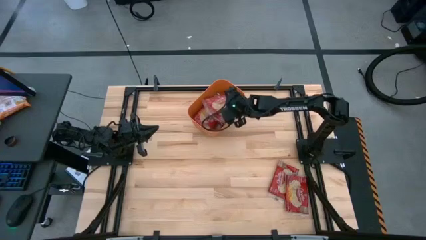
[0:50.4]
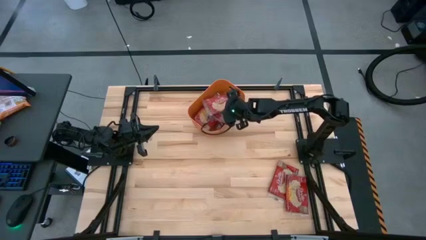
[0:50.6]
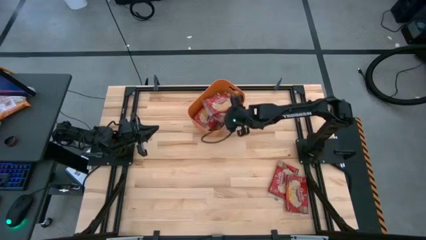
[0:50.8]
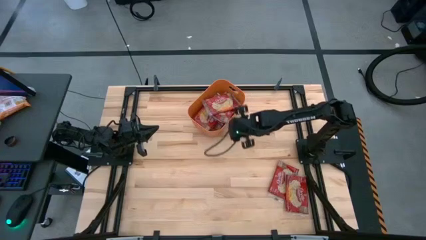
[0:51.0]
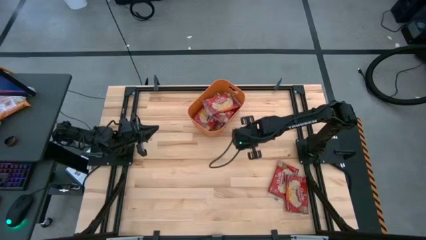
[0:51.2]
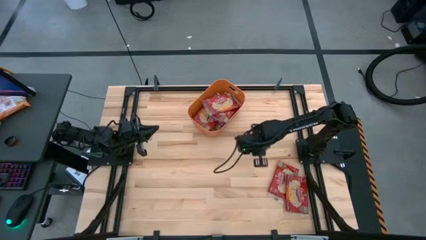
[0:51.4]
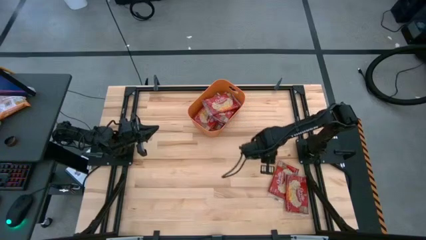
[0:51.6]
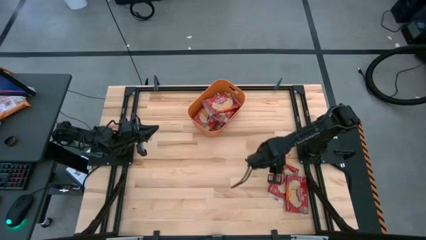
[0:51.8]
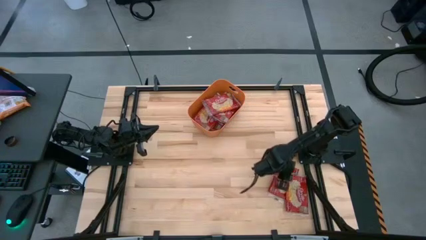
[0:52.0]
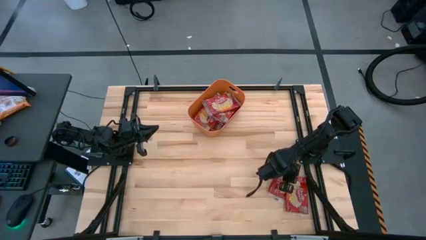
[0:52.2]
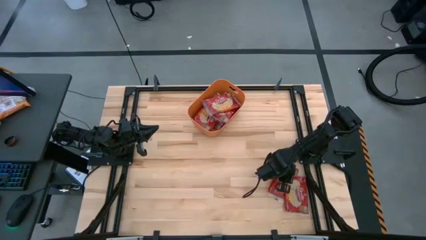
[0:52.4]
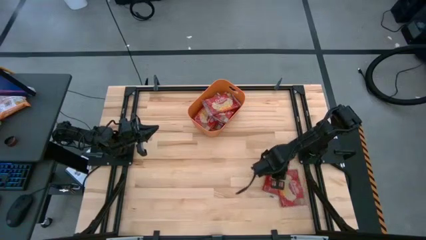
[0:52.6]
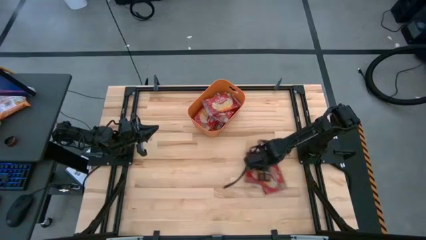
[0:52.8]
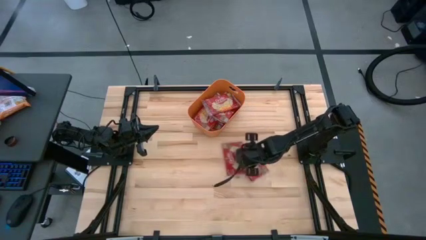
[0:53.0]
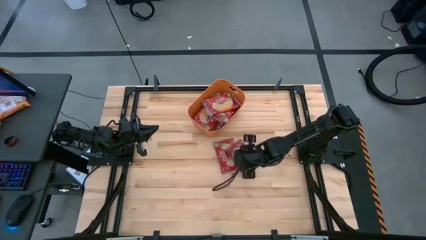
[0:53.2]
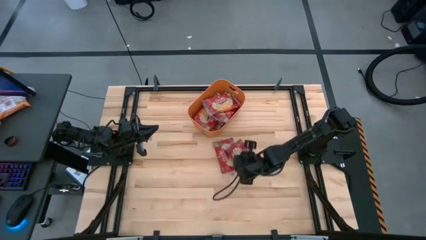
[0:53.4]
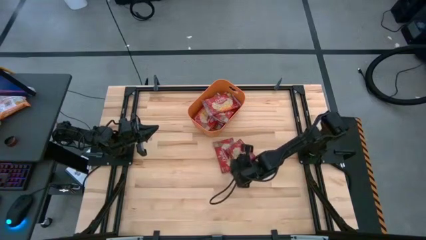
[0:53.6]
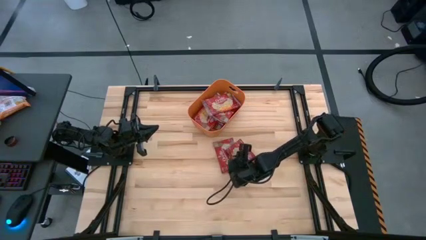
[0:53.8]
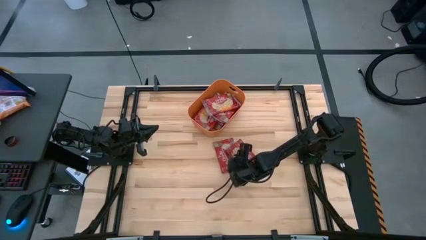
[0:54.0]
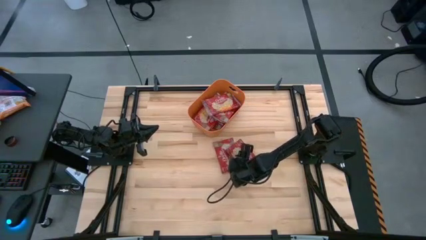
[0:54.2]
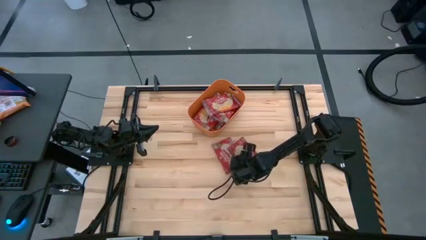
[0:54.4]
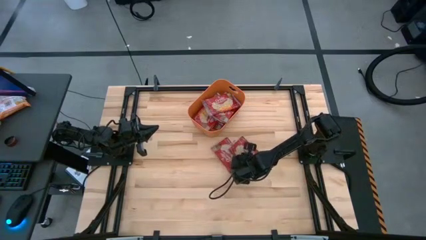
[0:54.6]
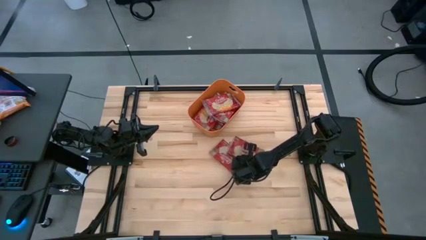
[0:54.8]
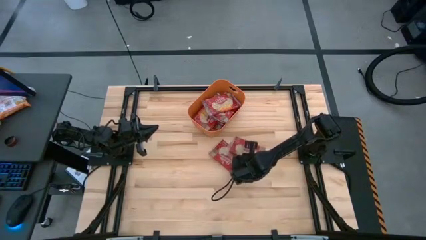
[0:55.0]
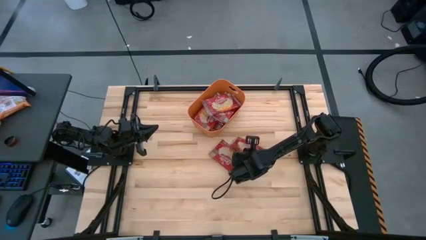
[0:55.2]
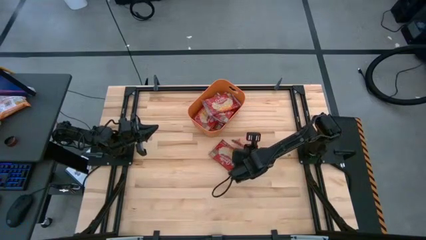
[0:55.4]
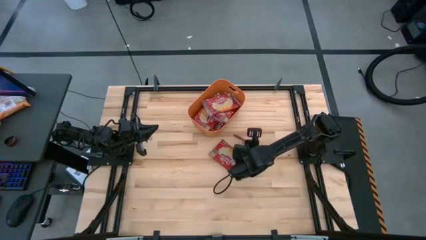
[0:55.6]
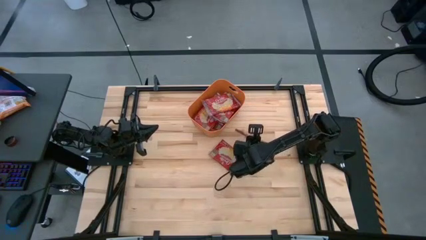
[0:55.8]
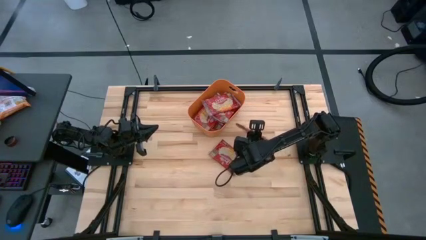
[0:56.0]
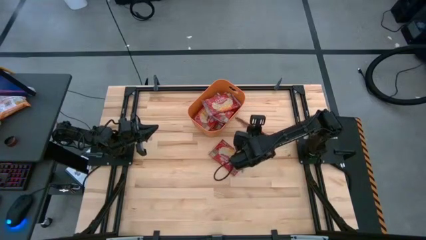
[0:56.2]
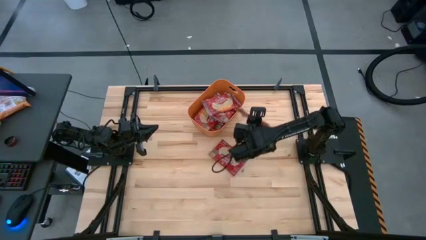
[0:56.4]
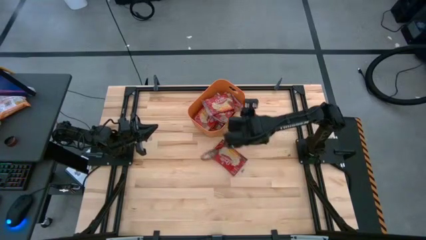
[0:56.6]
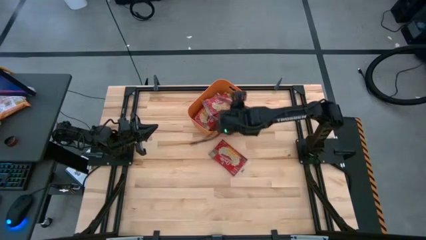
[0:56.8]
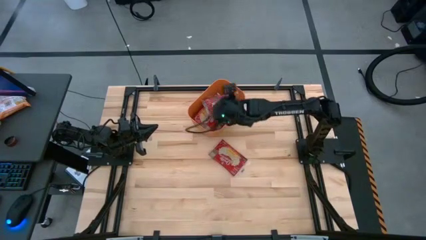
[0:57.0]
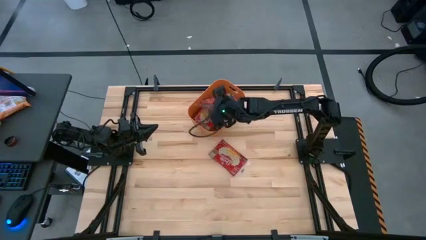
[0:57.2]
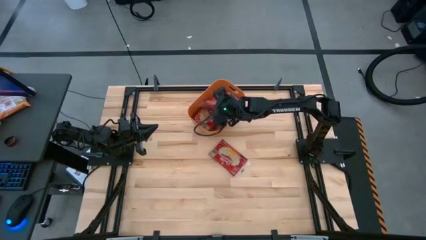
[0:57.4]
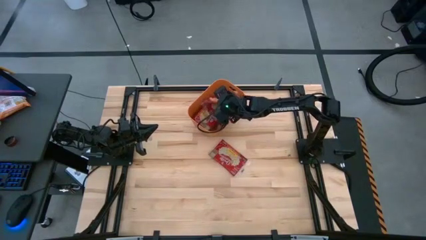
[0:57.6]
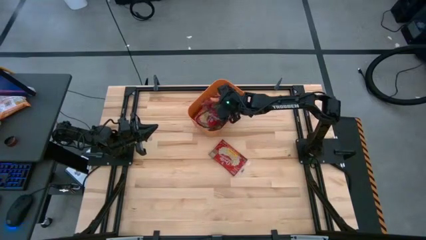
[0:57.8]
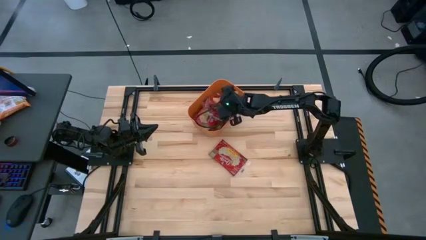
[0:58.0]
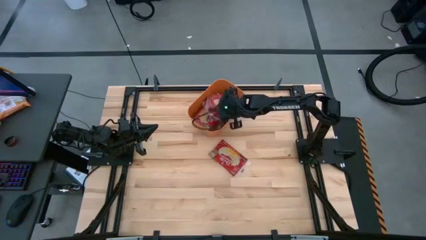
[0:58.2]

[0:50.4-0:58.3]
Task: Sort popcorn bags into baskets
Put the top red popcorn bag into the orange bin

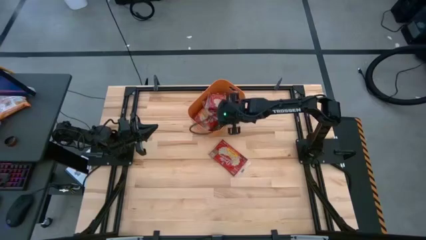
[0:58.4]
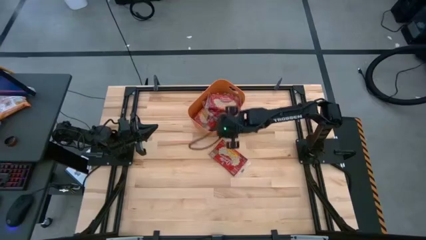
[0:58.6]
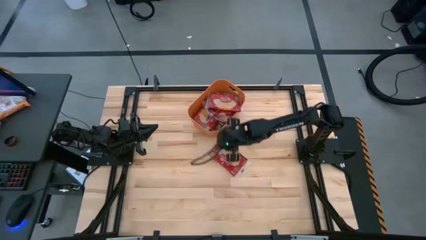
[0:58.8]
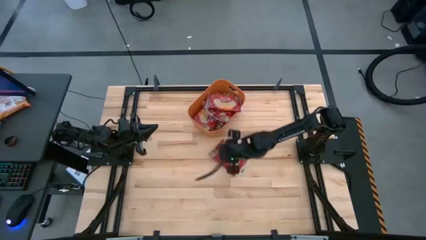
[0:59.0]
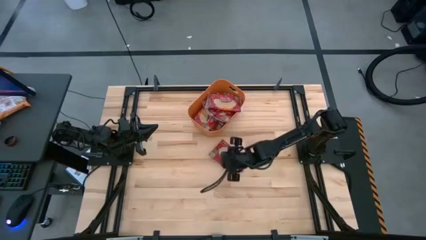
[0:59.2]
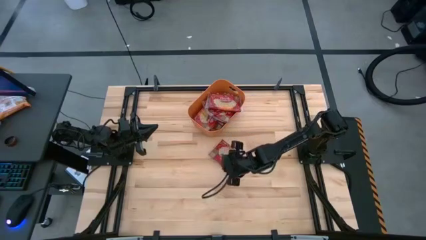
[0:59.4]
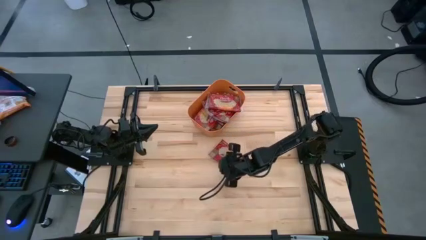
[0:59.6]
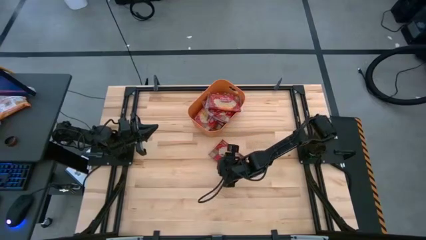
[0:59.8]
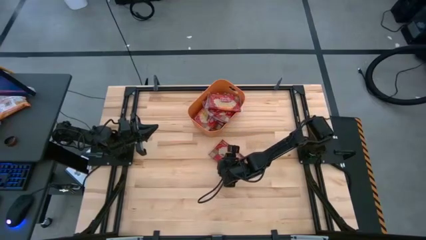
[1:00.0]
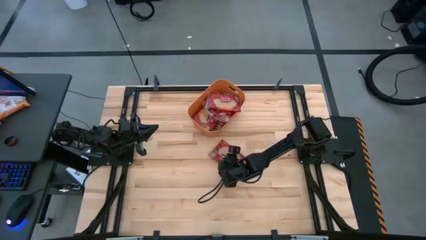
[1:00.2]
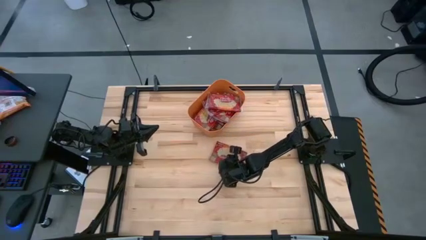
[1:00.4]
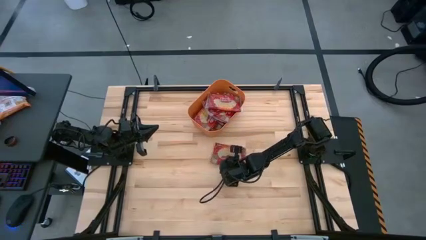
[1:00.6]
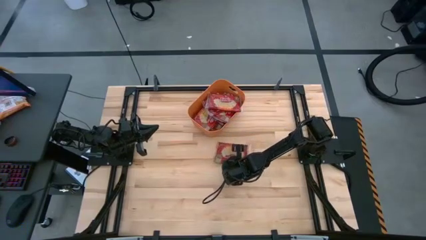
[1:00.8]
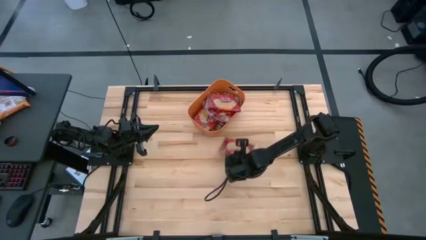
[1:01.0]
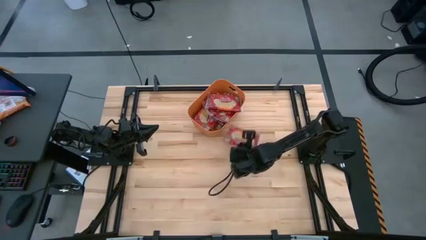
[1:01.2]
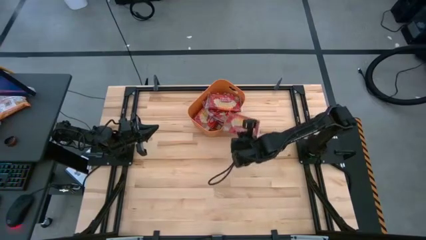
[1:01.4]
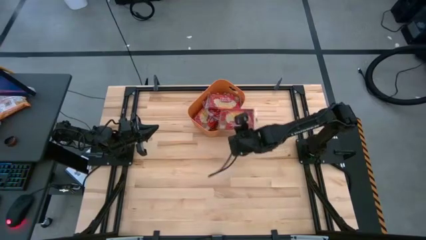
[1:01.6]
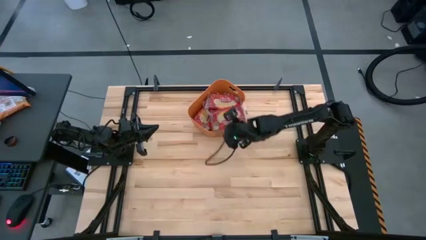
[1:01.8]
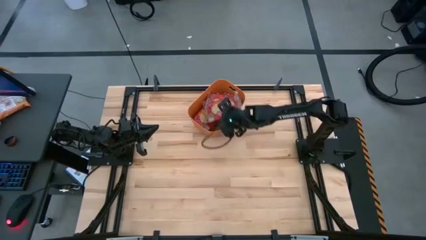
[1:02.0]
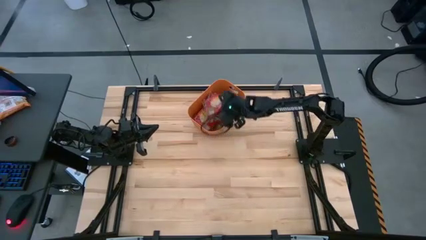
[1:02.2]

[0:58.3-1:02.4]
Put the red popcorn bag into the orange bin

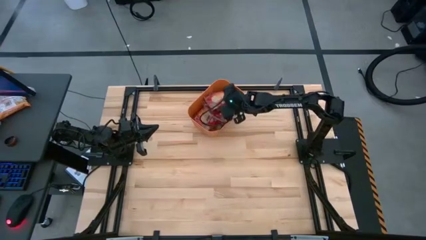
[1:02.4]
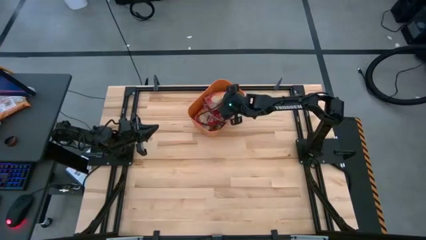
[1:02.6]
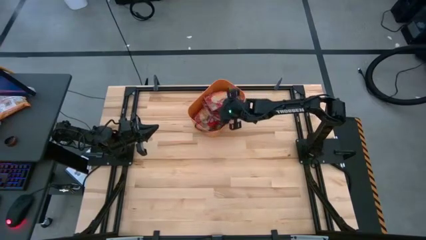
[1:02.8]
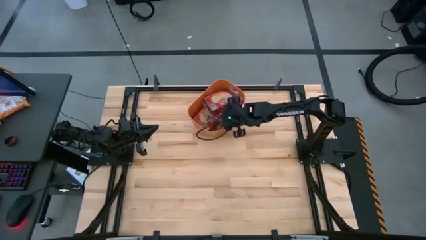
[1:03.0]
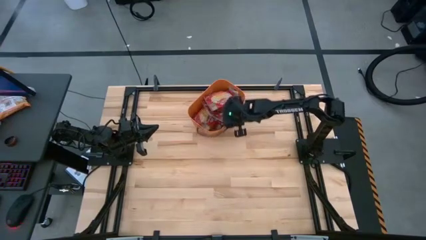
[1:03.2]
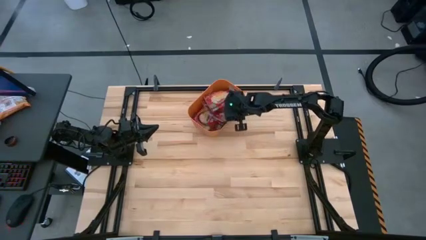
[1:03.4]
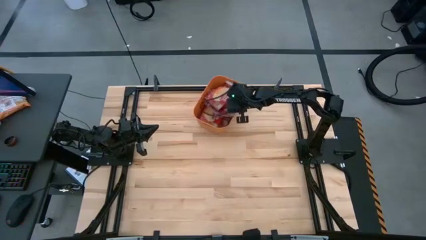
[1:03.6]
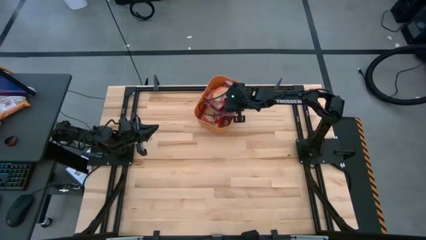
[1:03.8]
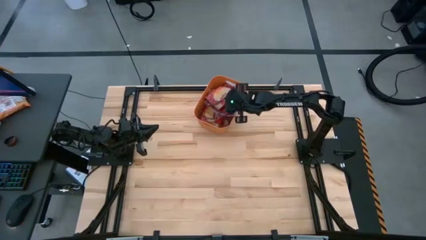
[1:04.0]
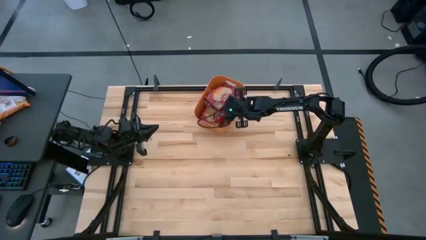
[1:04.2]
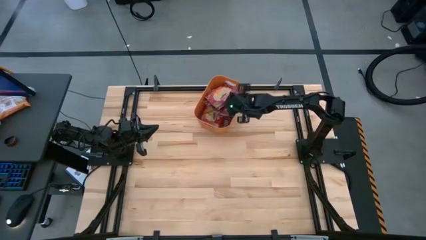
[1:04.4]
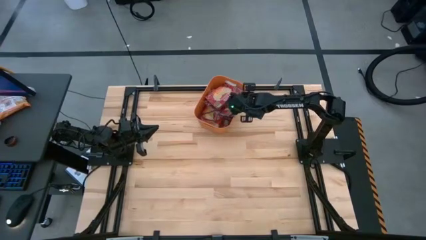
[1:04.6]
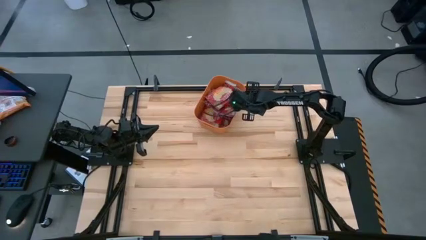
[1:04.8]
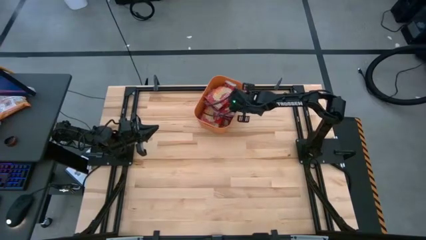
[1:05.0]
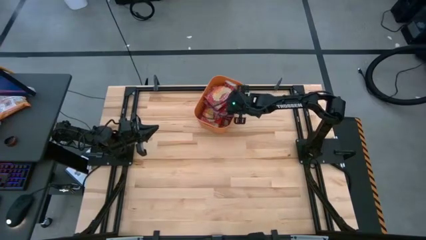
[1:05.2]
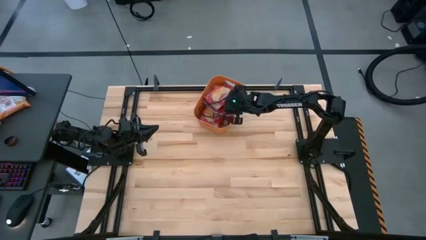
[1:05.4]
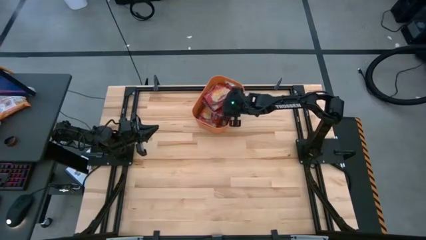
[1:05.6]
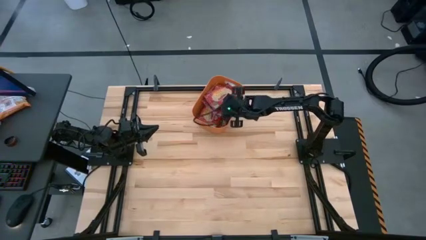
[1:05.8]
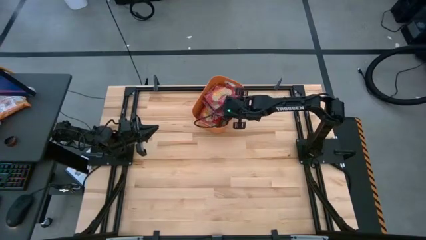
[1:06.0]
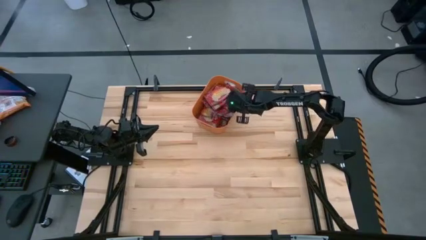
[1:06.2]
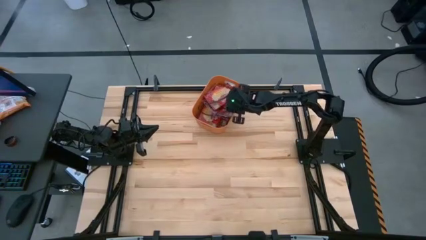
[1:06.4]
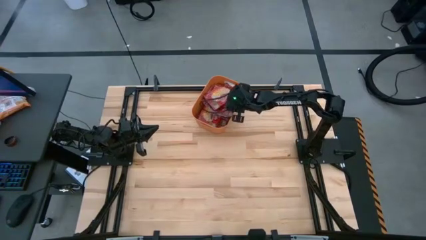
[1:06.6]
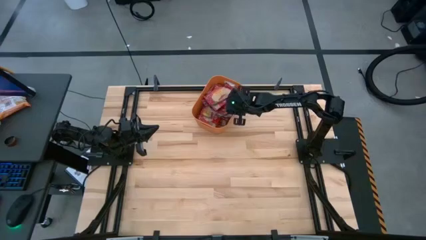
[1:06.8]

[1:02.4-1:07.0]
Adjust the red popcorn bags in the orange bin

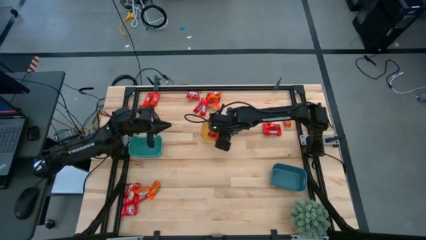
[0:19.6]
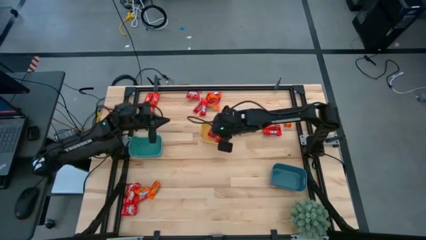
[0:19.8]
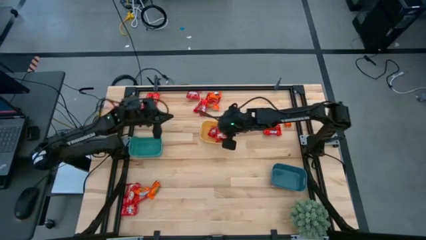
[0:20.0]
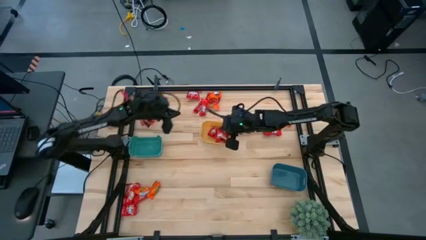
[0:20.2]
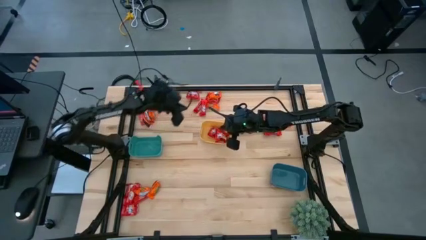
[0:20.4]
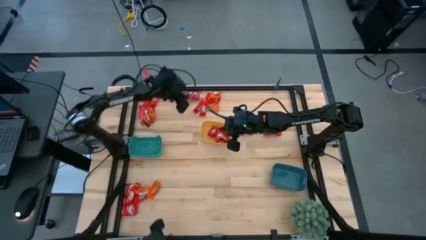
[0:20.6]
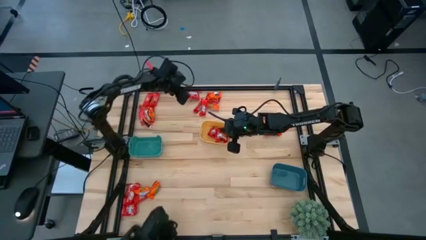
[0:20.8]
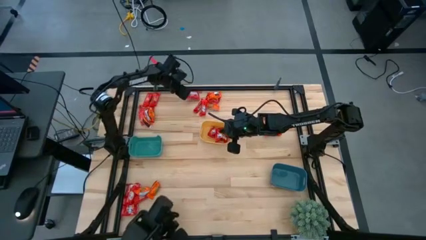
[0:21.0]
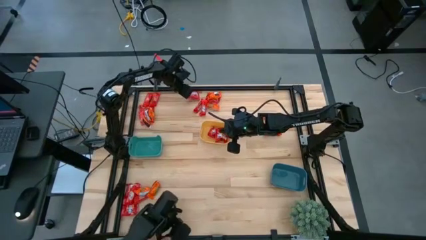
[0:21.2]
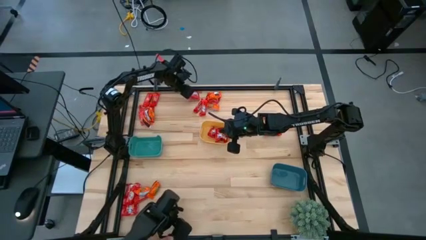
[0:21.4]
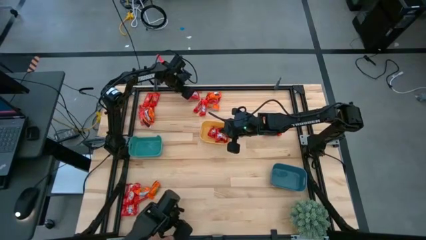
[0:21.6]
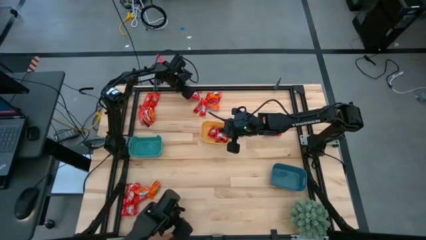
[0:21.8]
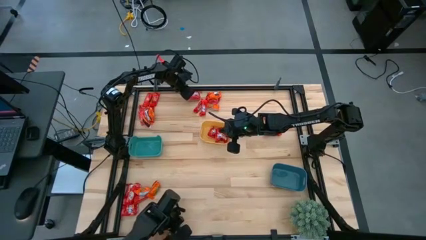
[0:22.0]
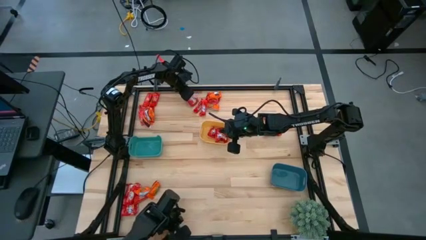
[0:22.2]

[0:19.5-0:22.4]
Task: Sort candy
Put the red candy into the yellow bin
